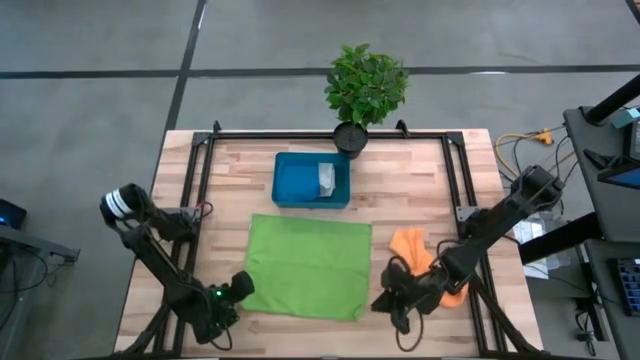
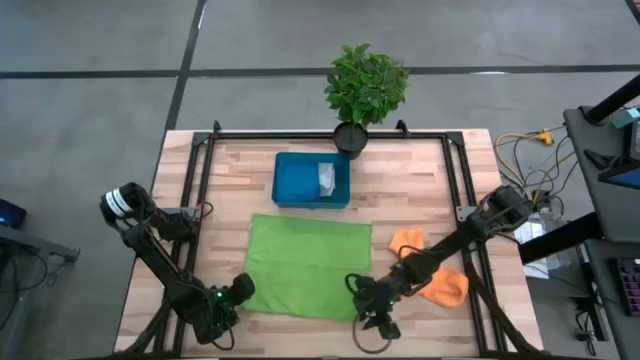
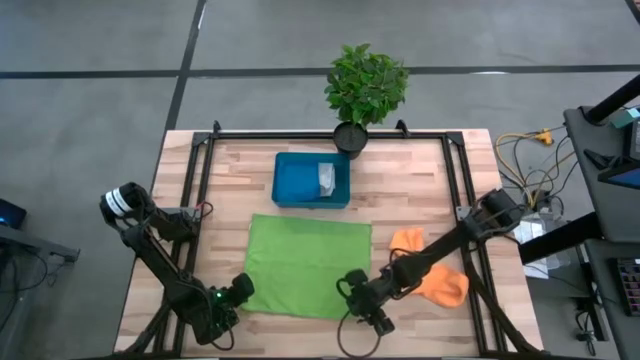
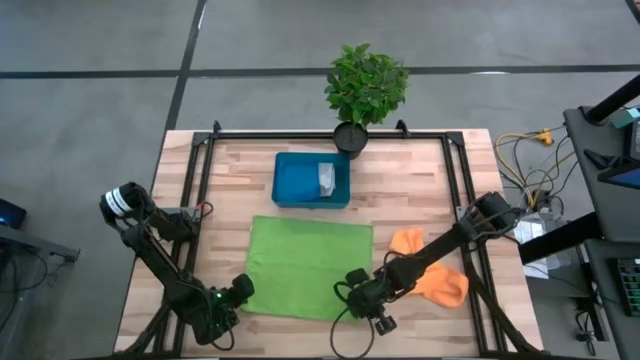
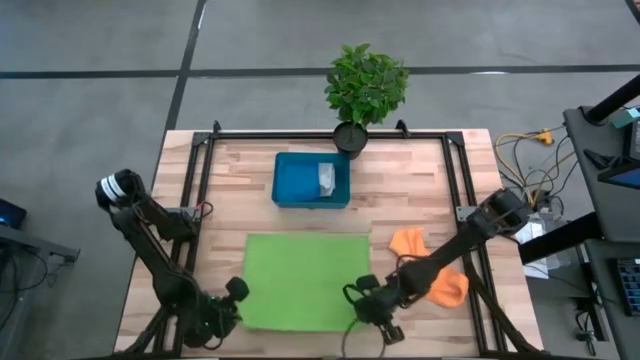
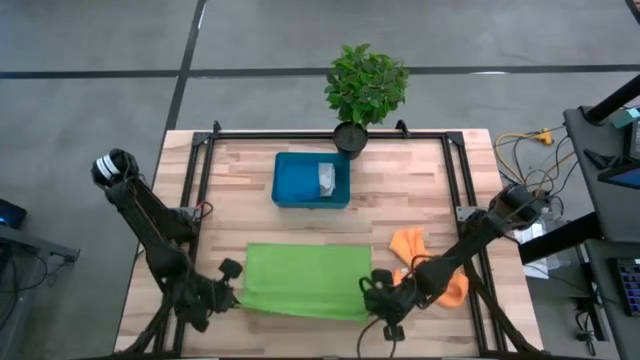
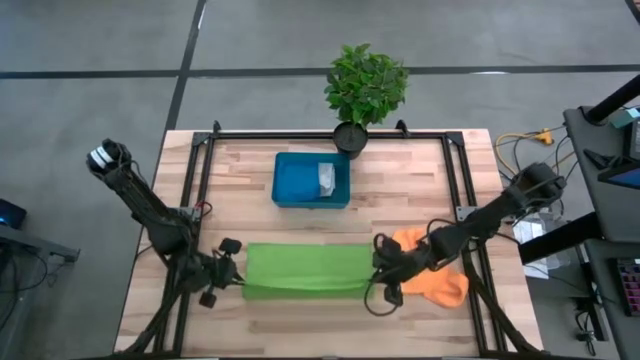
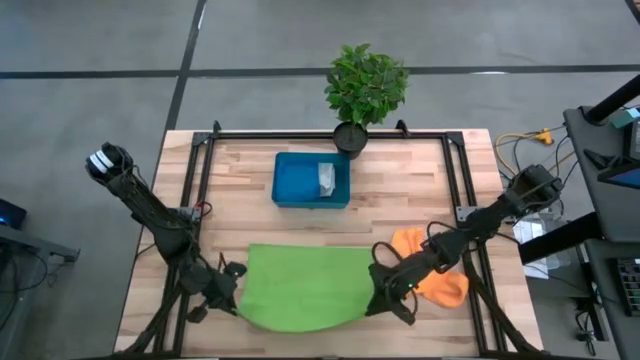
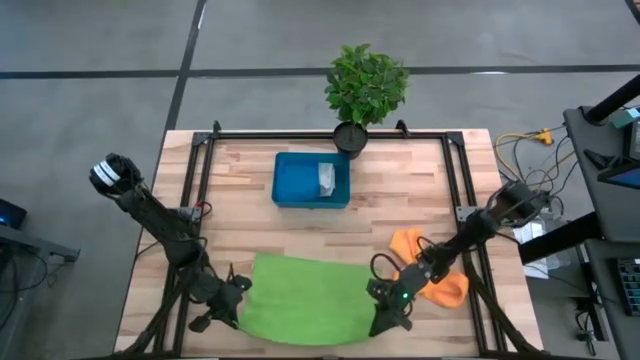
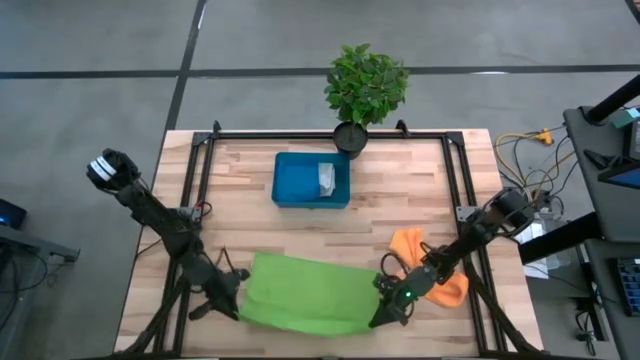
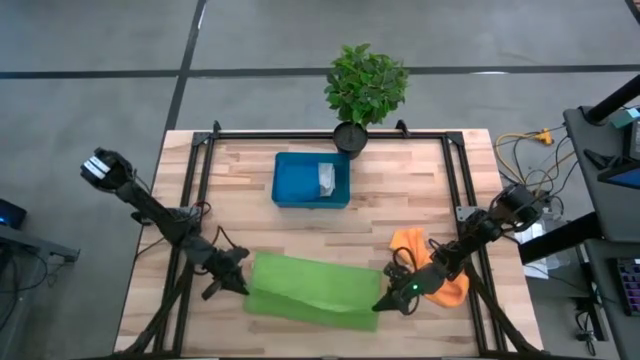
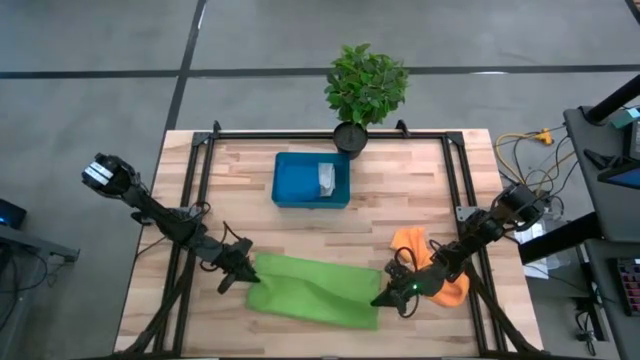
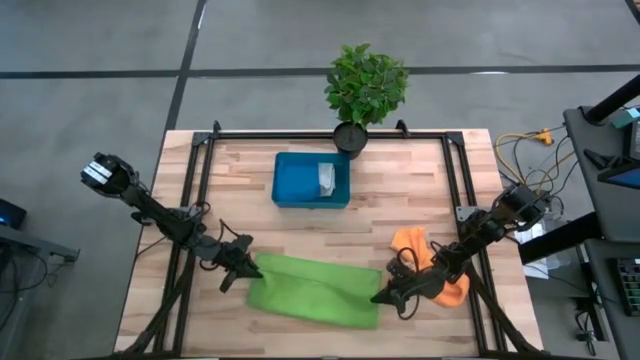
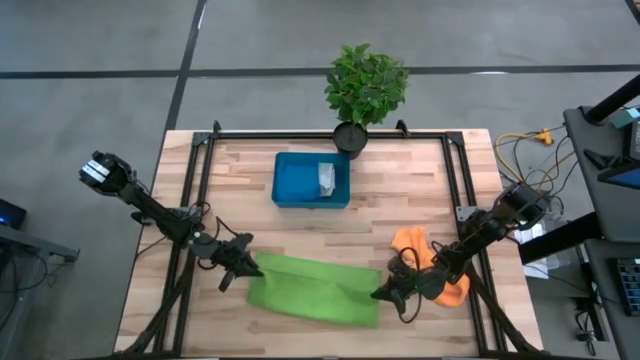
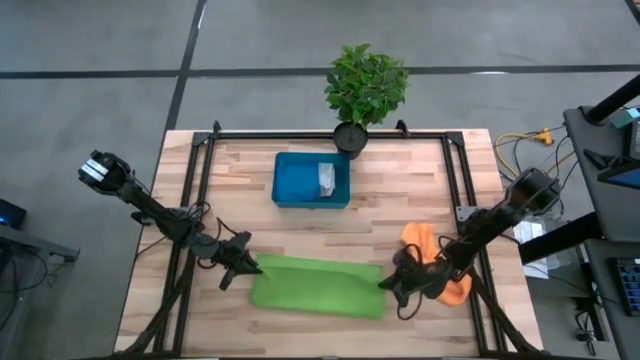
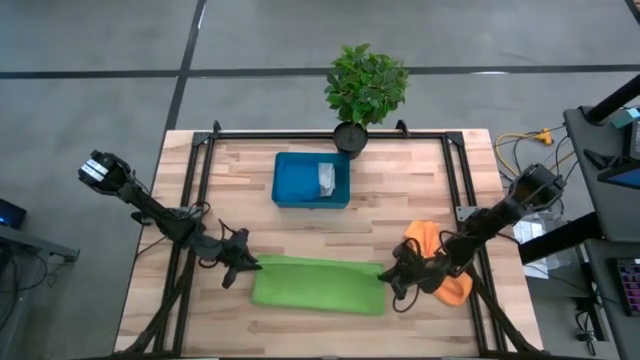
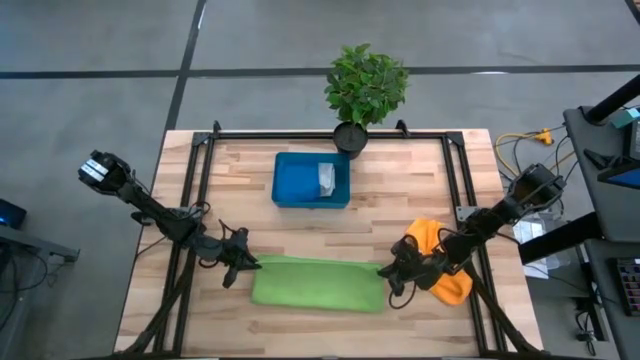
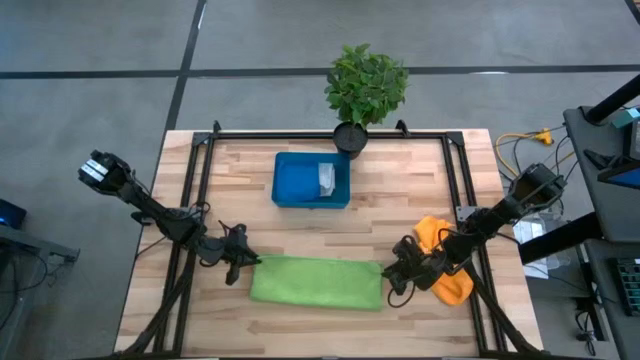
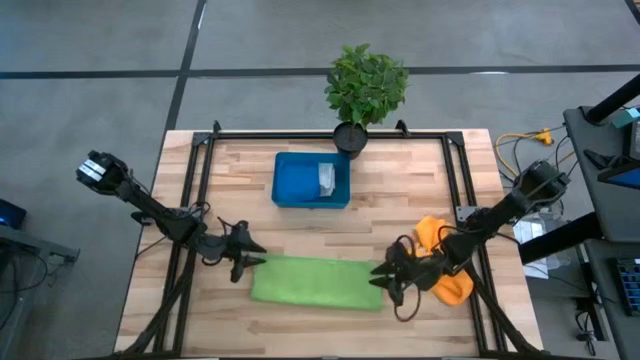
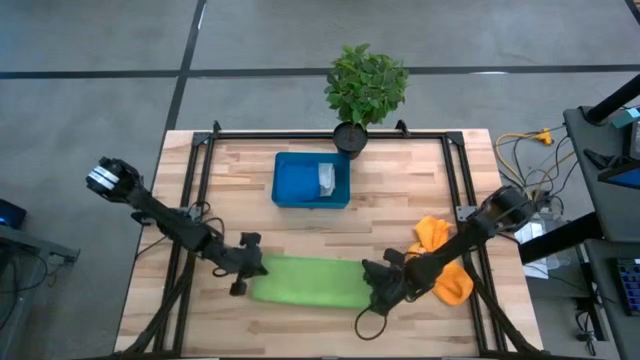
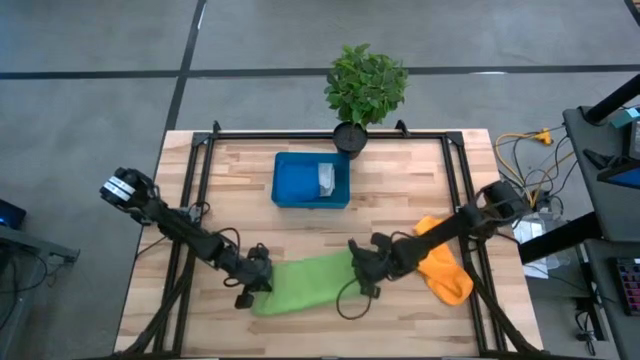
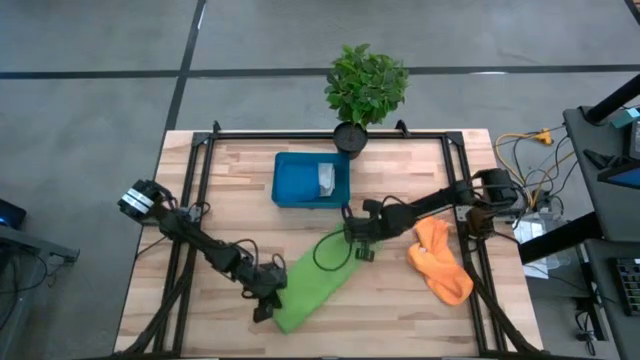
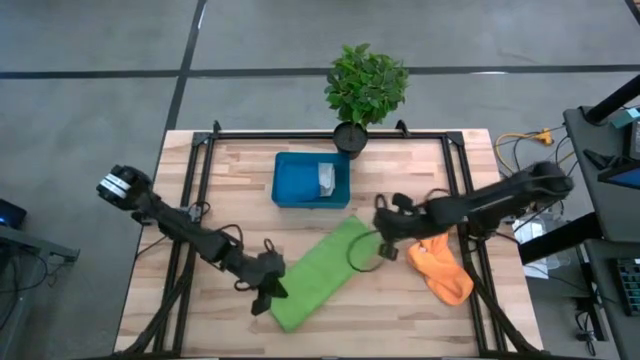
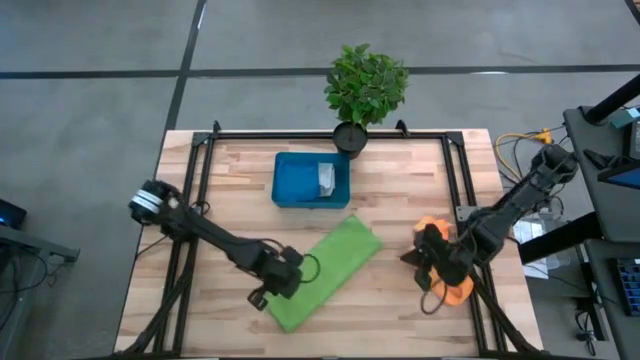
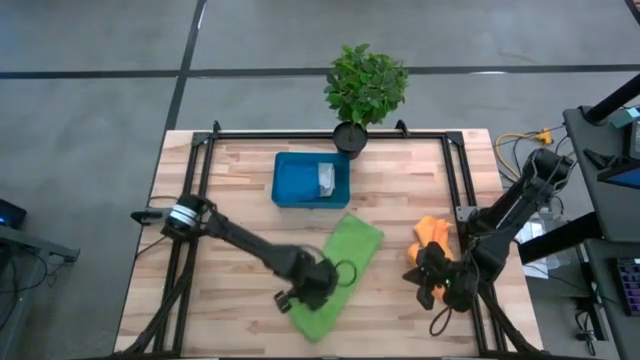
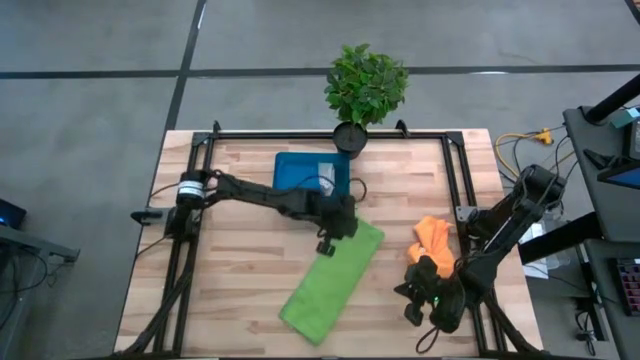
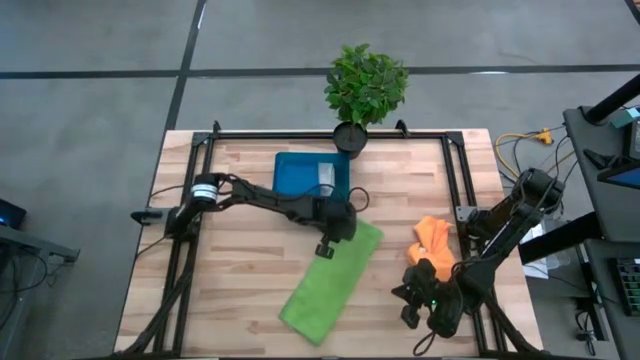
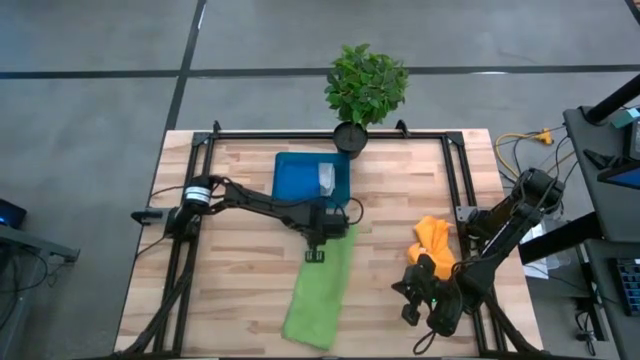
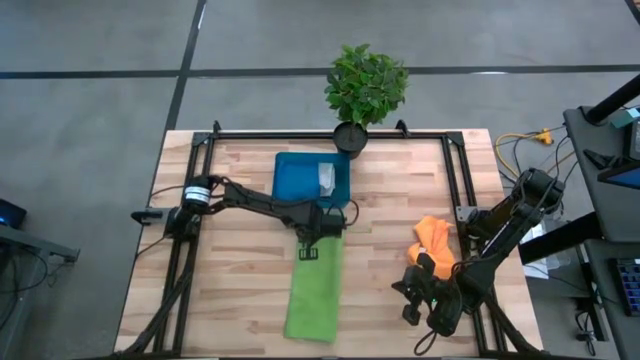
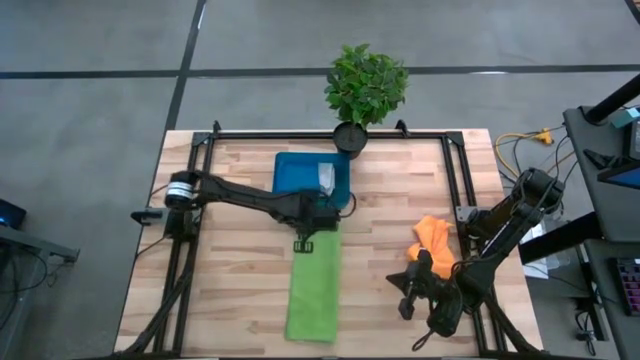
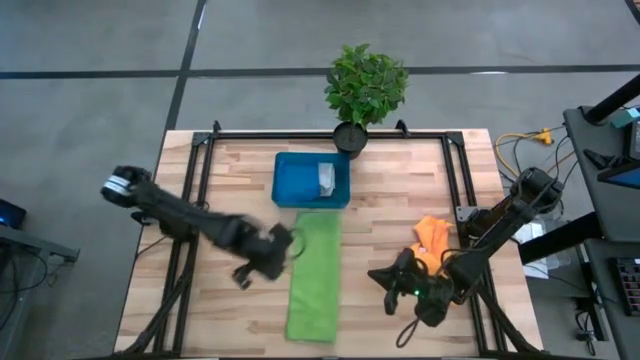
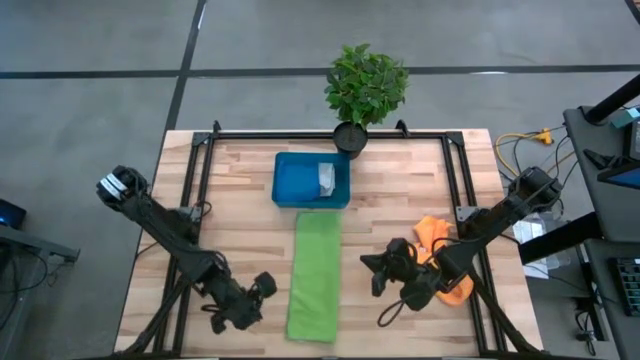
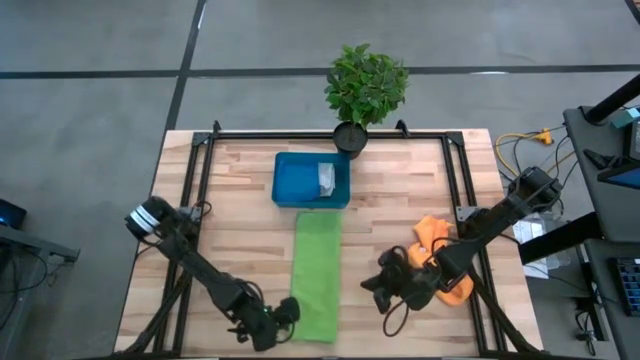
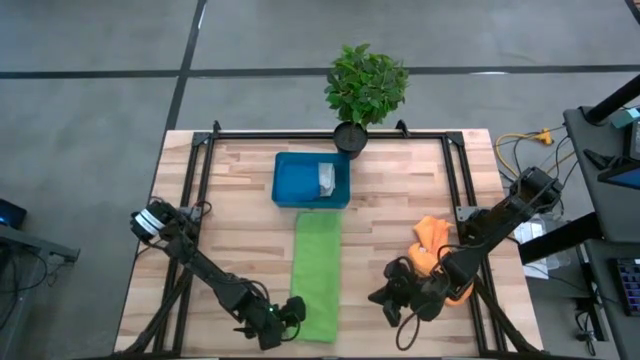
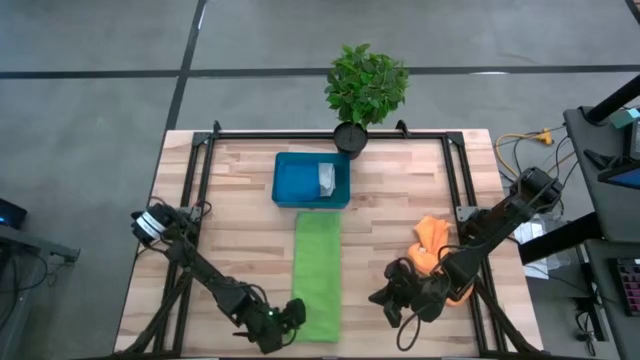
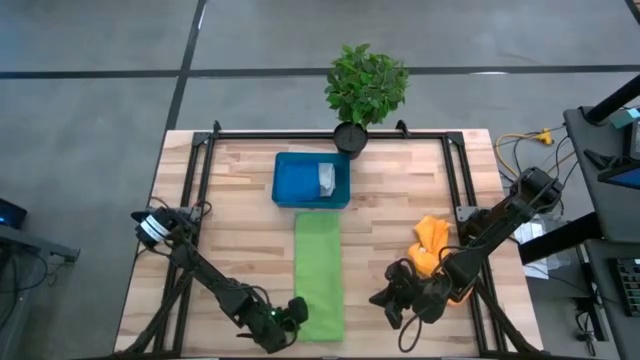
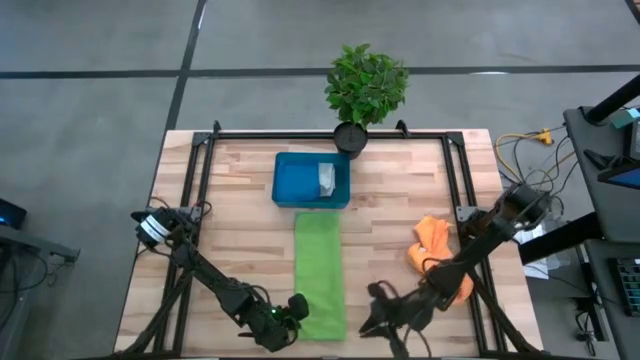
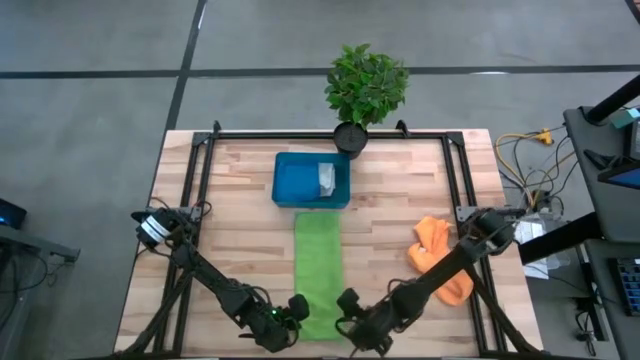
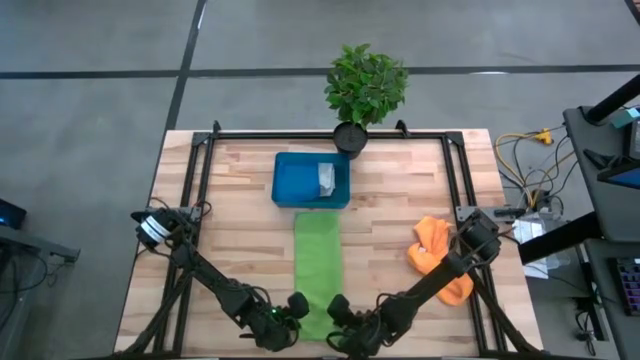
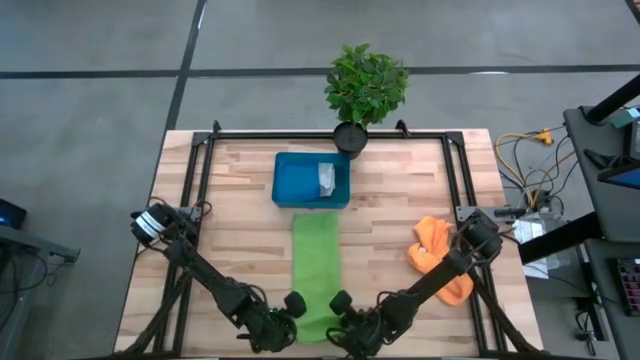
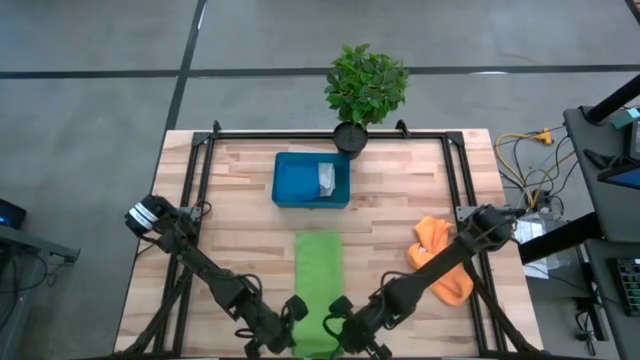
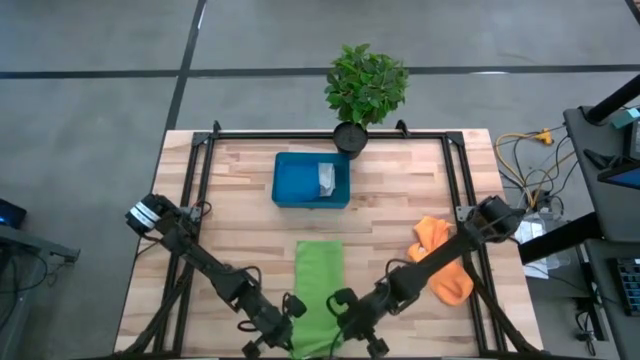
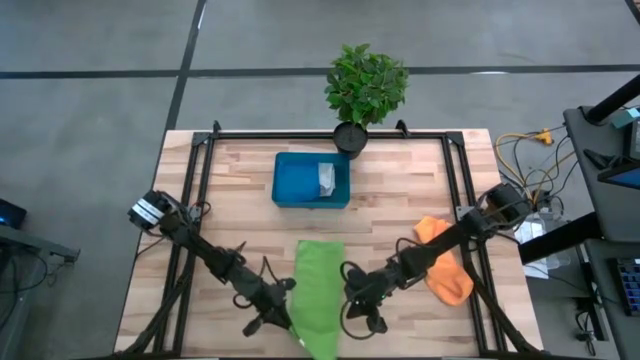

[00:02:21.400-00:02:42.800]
Task: Fold microfiber towels
Fold the green microfiber towel
